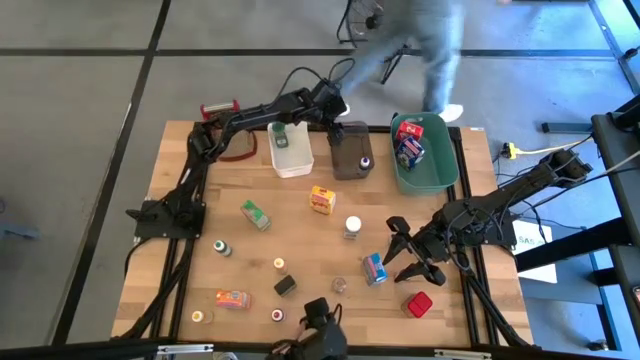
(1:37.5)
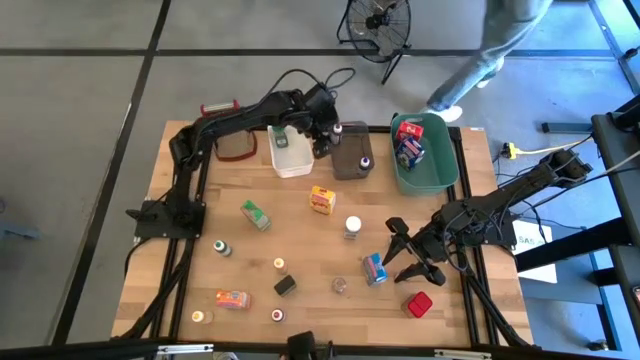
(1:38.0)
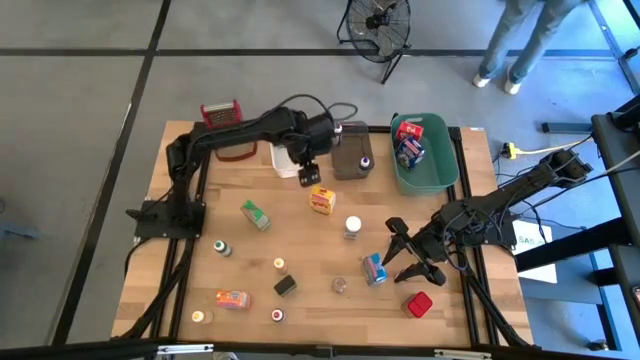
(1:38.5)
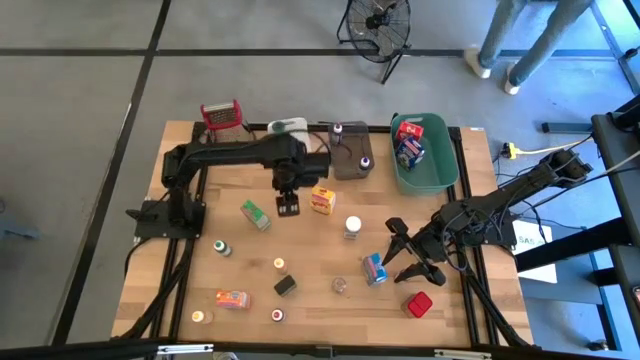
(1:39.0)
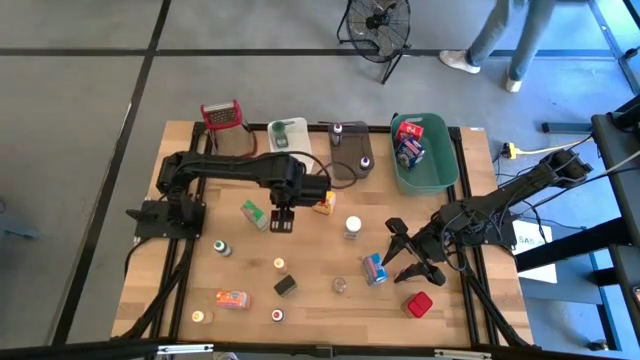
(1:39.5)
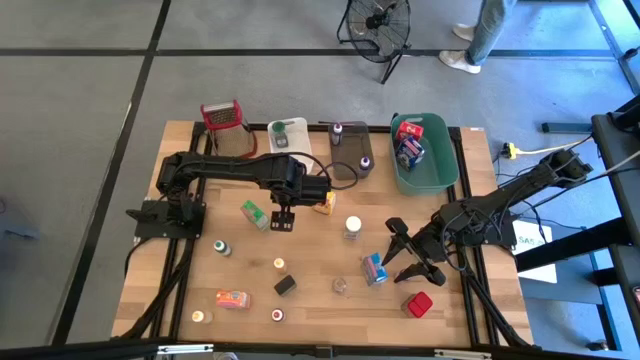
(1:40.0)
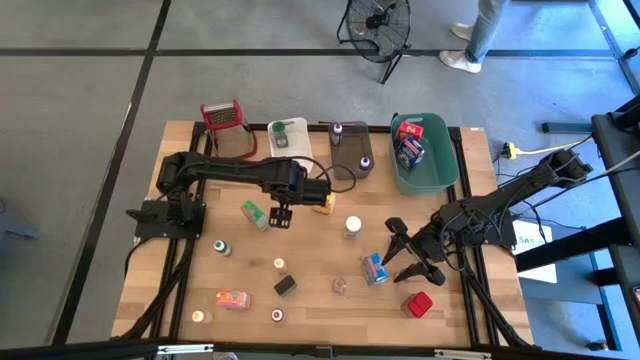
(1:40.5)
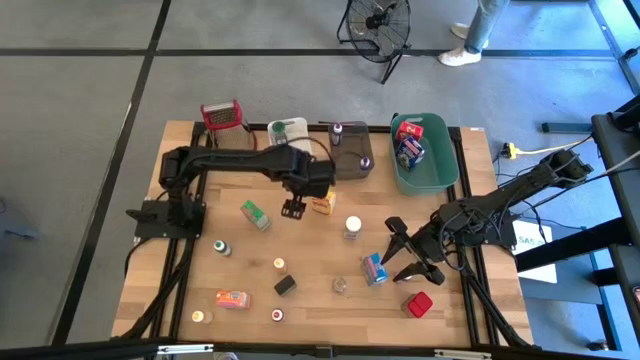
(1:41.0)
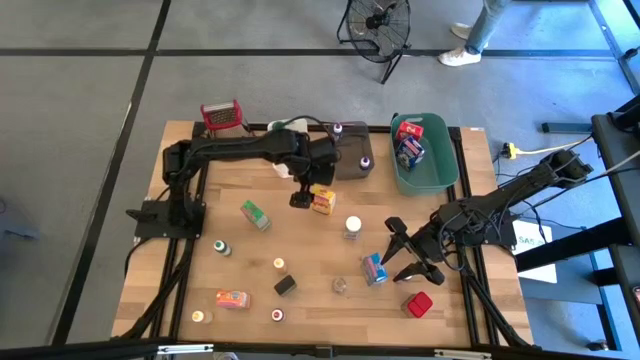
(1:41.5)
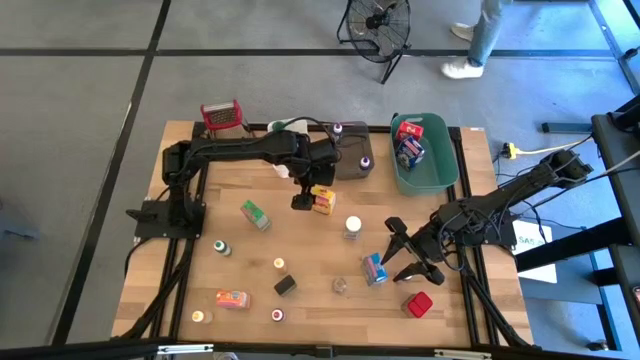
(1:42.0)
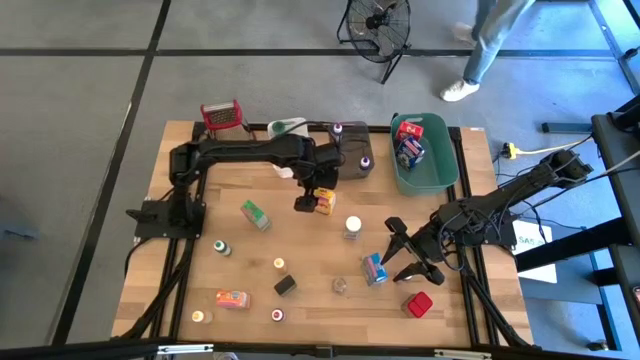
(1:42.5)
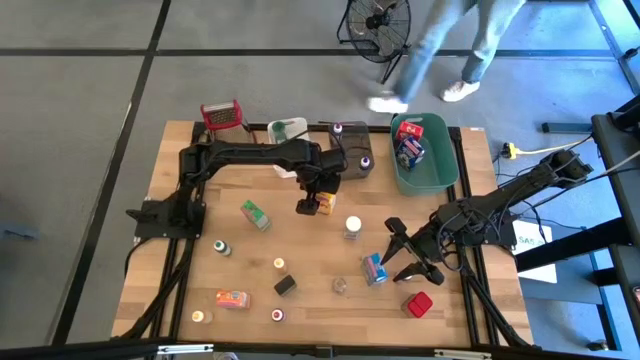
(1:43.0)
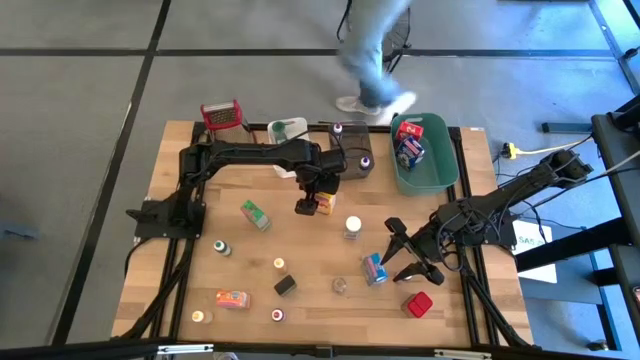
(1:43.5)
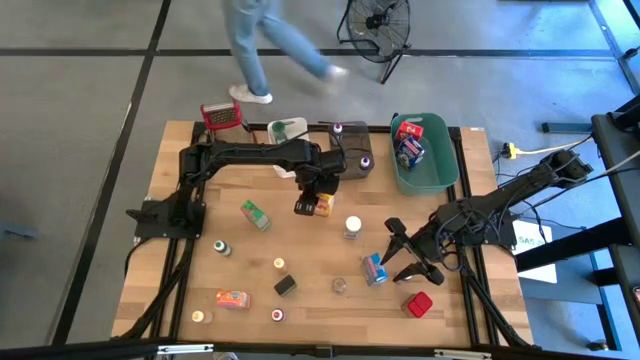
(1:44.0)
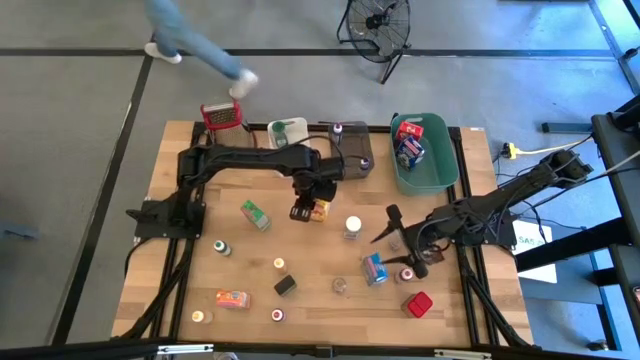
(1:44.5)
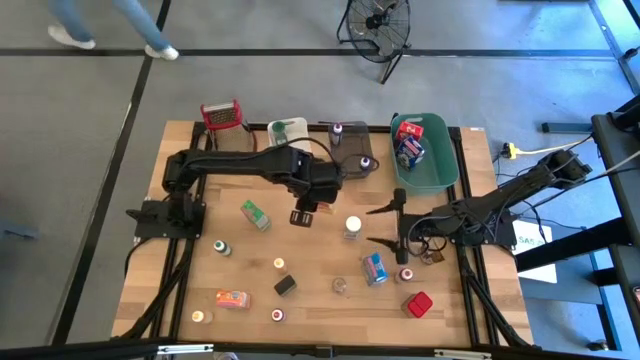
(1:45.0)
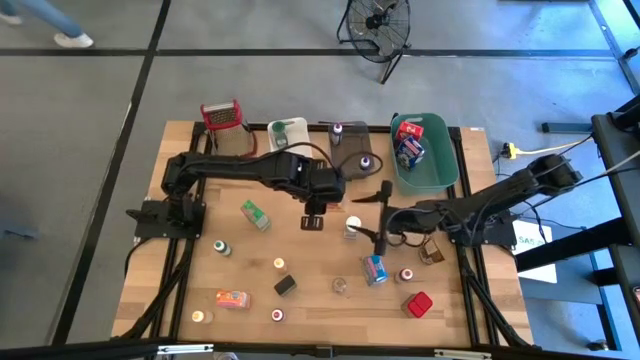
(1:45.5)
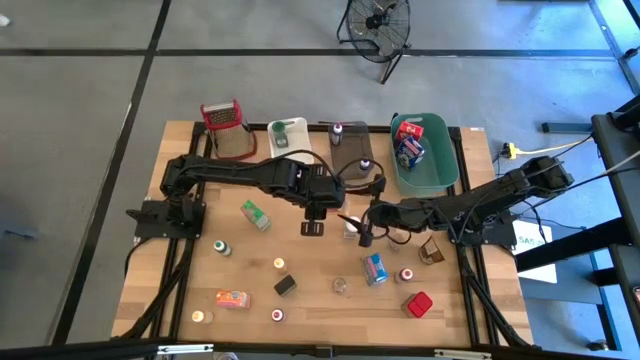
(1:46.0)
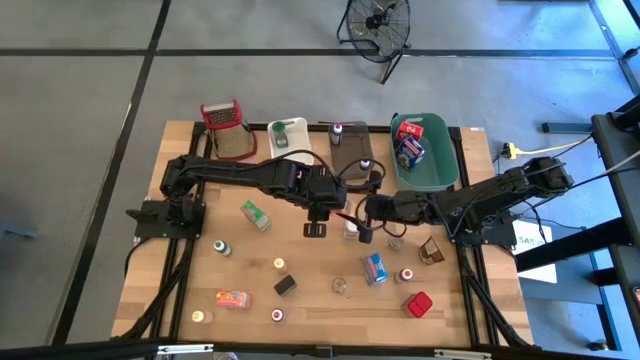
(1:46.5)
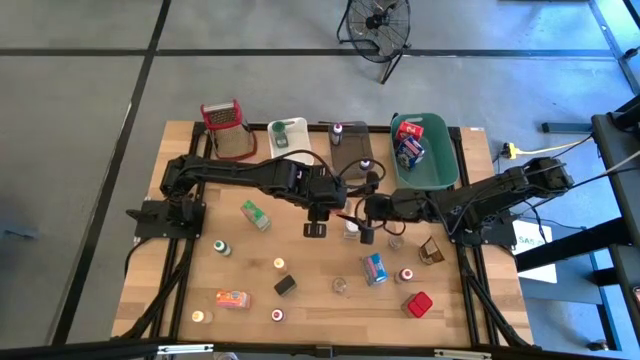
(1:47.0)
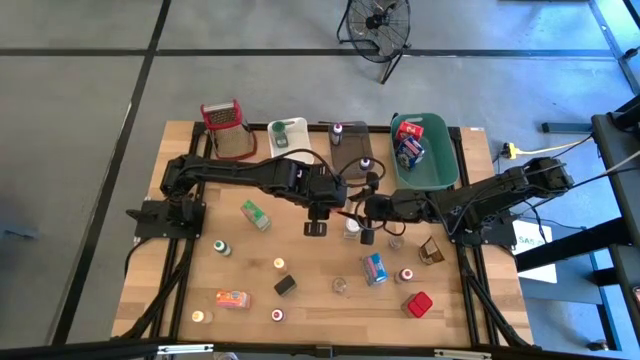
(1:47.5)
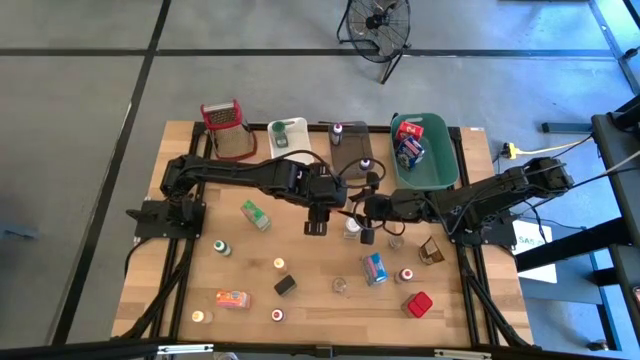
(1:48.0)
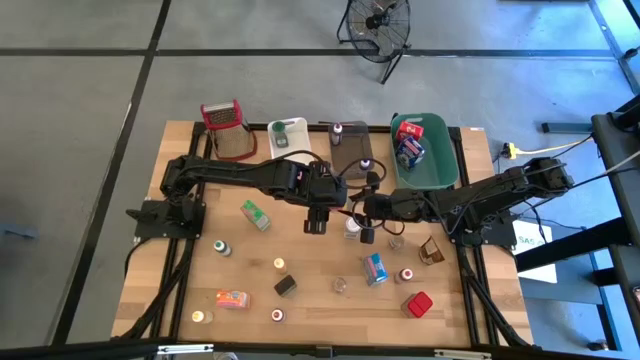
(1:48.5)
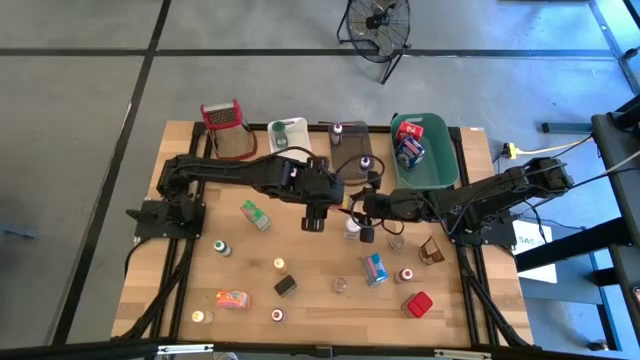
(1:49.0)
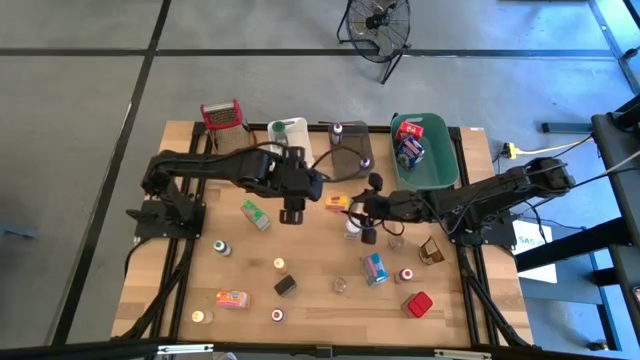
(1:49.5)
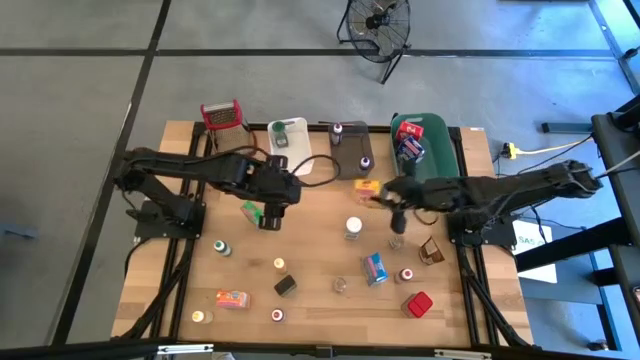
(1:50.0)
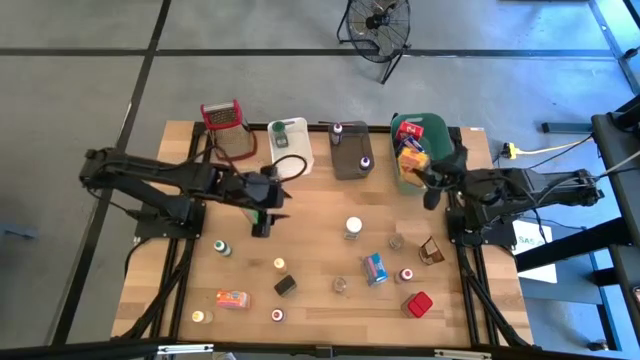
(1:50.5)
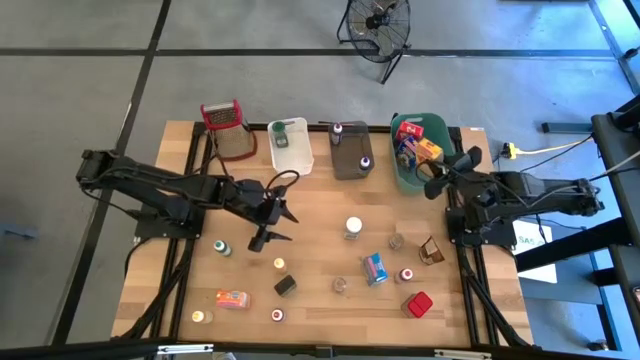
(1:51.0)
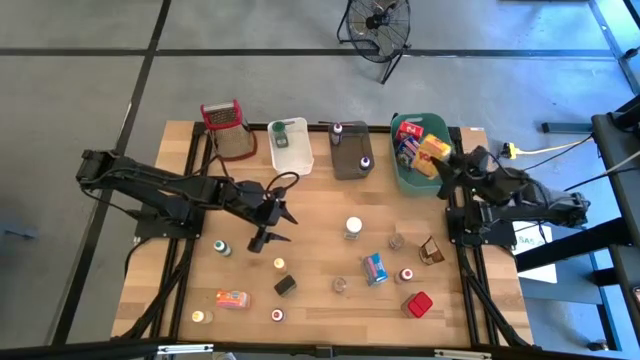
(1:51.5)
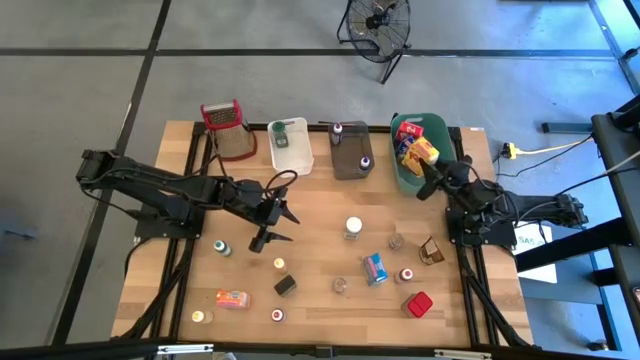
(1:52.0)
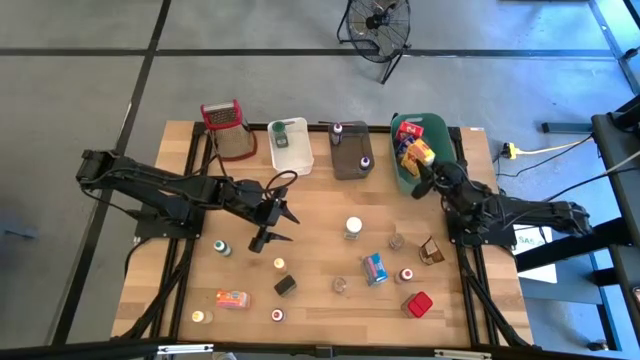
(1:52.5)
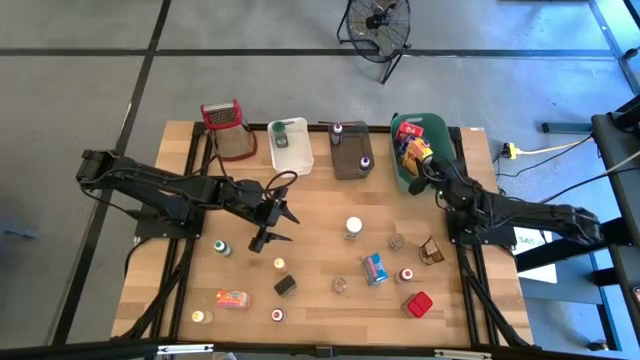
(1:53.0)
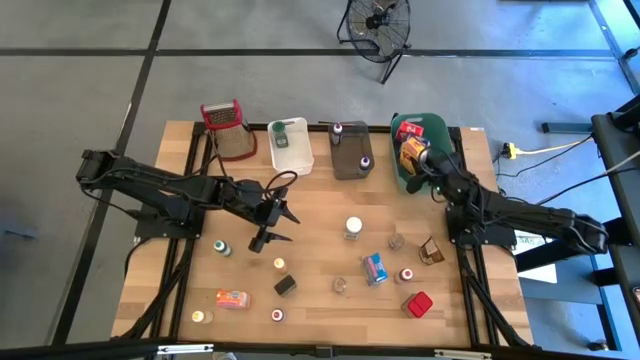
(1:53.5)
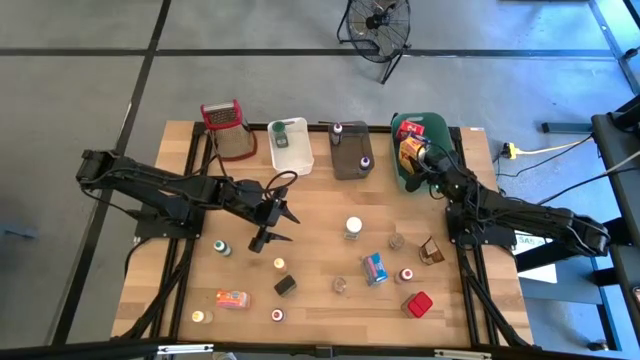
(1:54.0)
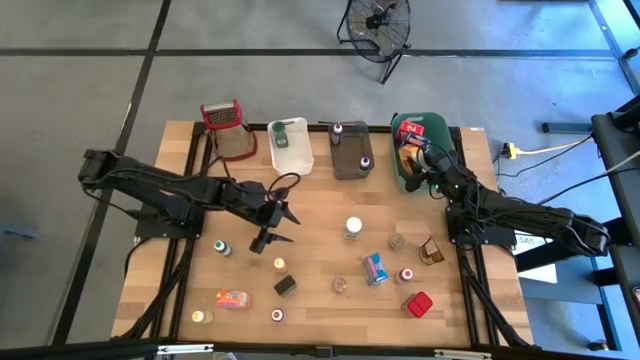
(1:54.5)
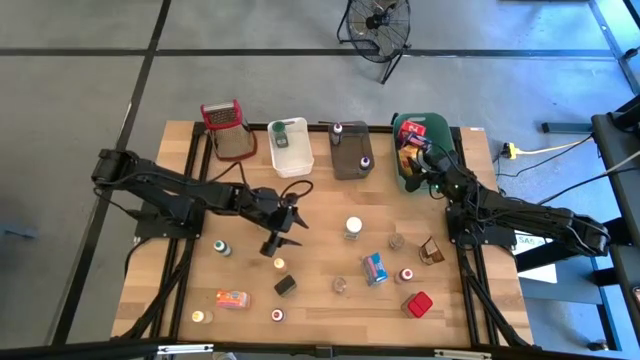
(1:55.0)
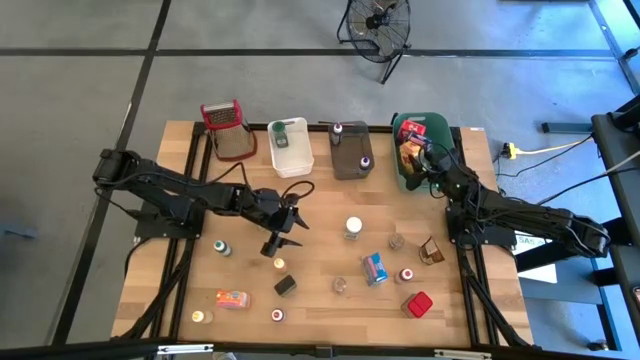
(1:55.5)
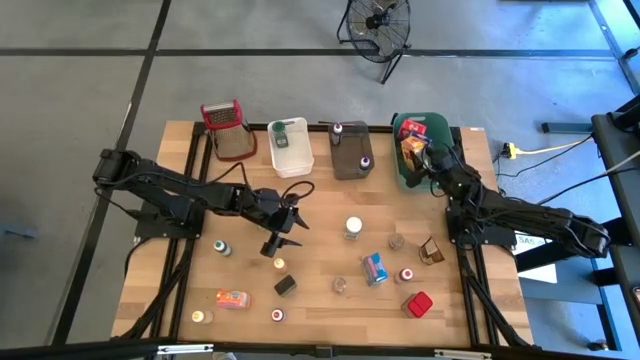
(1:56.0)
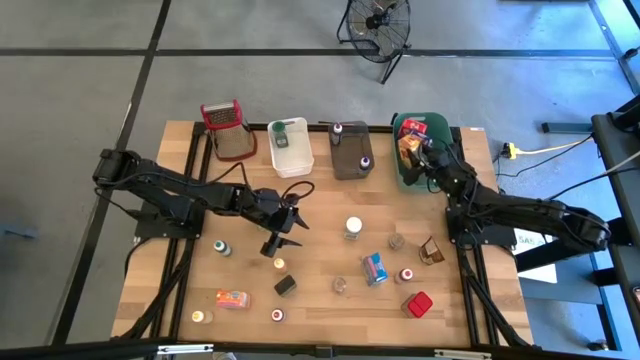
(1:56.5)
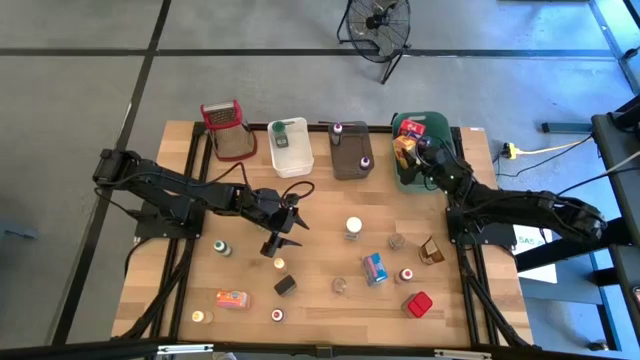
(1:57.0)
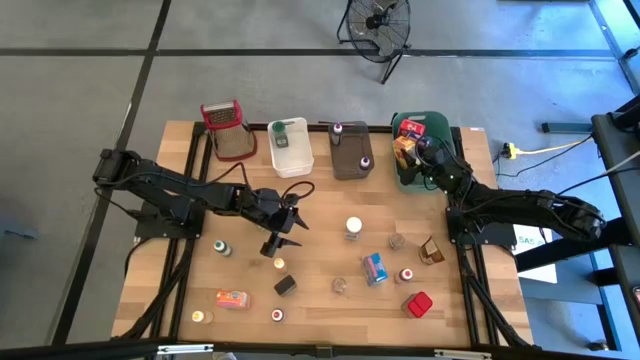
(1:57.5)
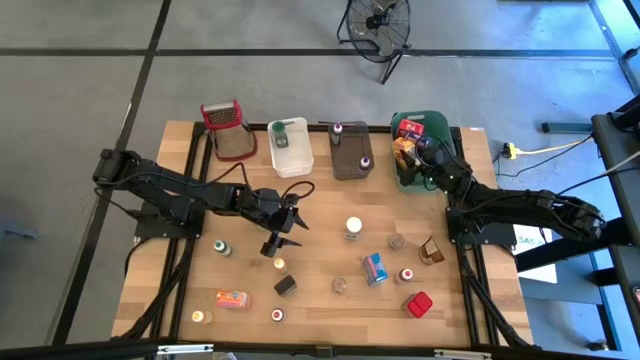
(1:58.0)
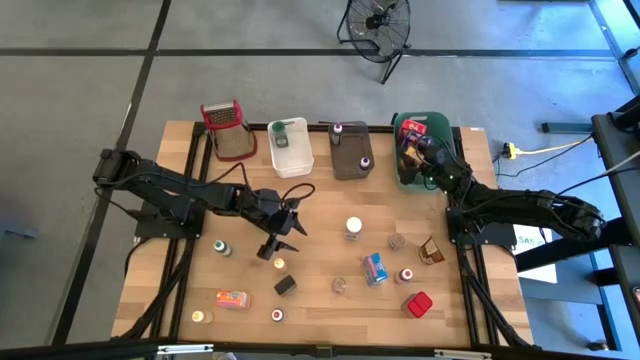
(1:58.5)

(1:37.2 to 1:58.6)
Task: Pick & Place Kitchen Items
Put the yellow cereal box into the green bin
